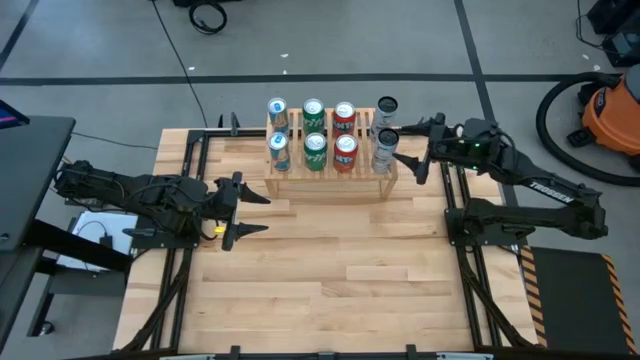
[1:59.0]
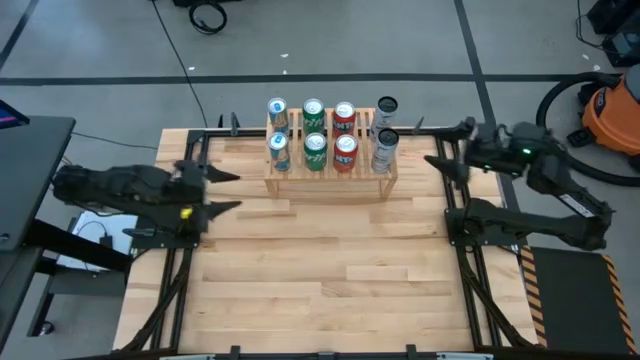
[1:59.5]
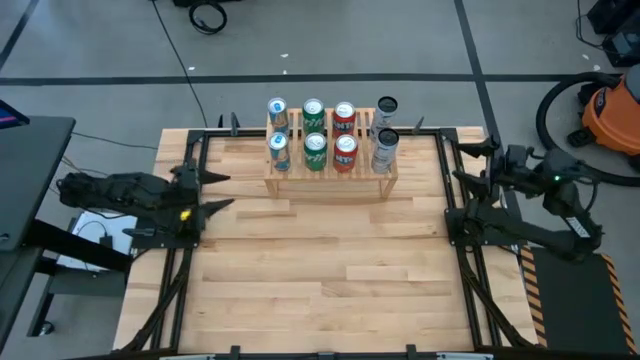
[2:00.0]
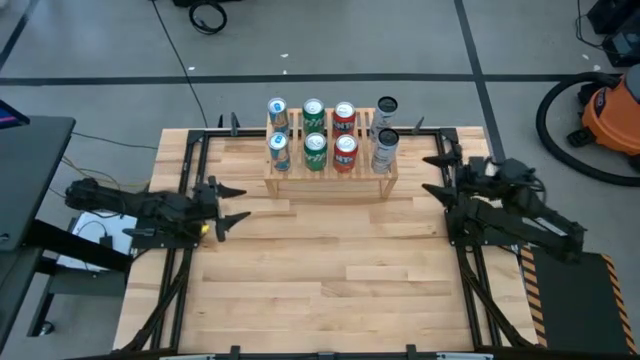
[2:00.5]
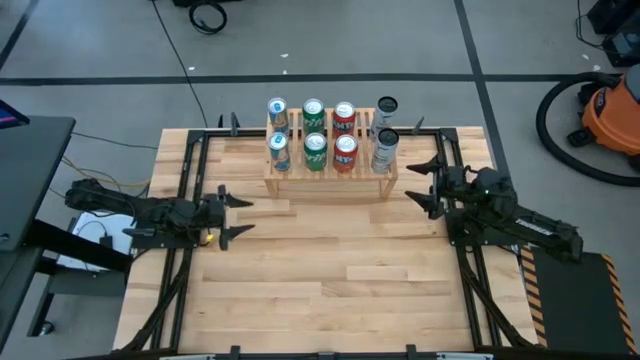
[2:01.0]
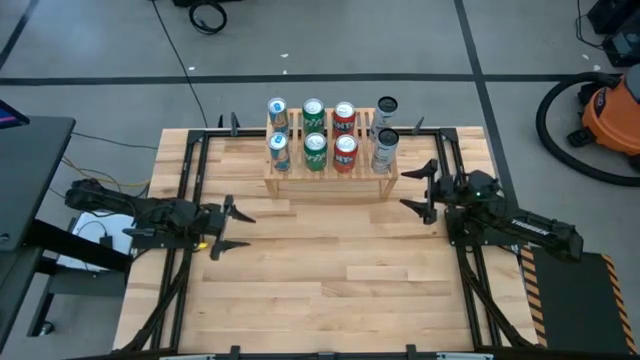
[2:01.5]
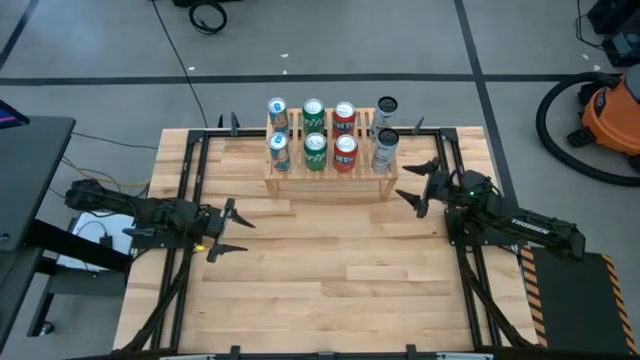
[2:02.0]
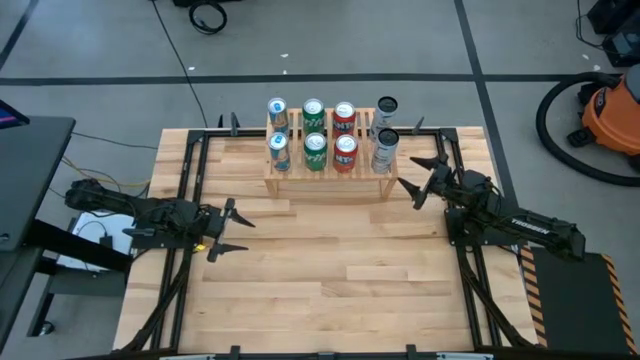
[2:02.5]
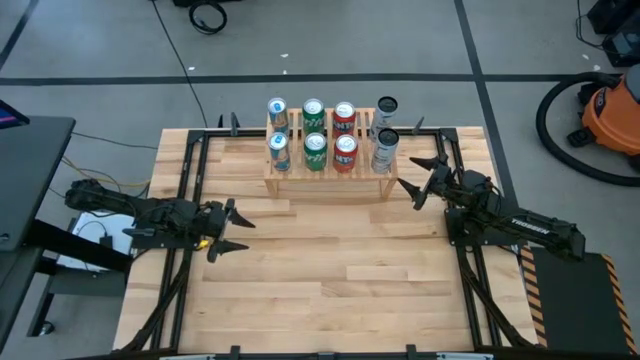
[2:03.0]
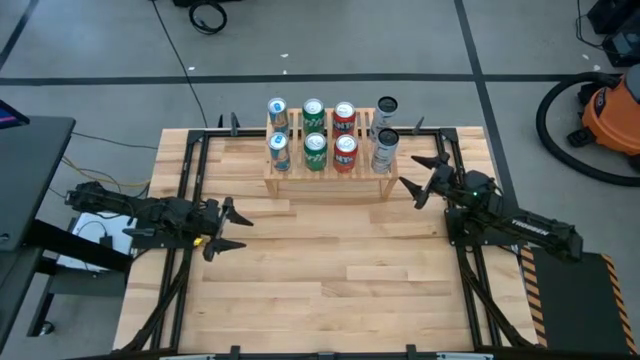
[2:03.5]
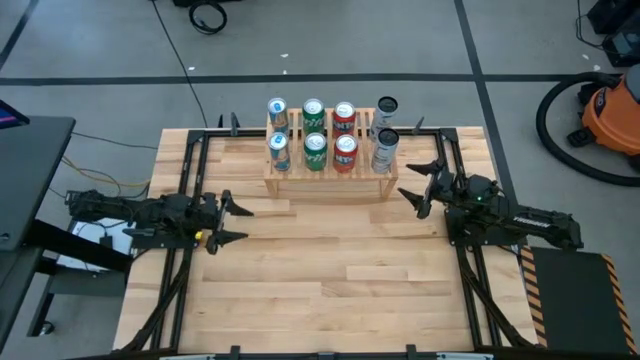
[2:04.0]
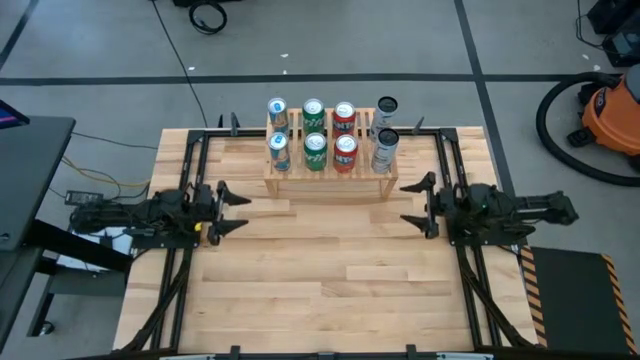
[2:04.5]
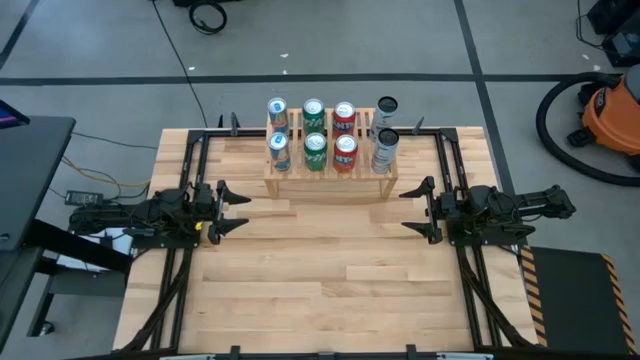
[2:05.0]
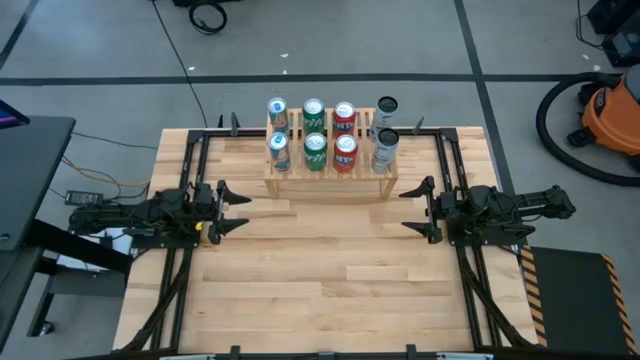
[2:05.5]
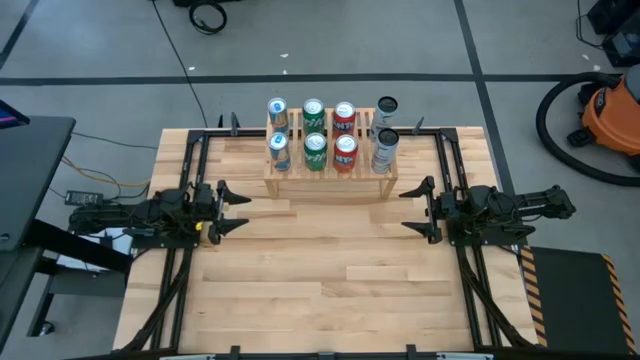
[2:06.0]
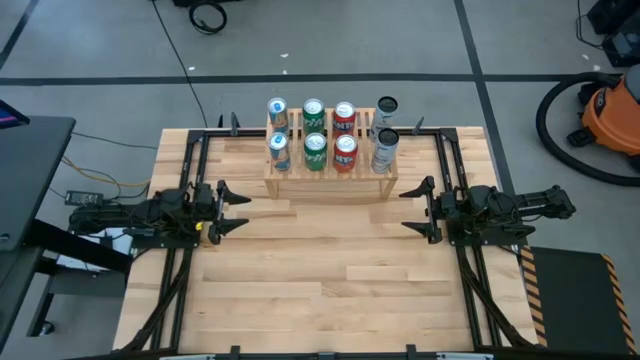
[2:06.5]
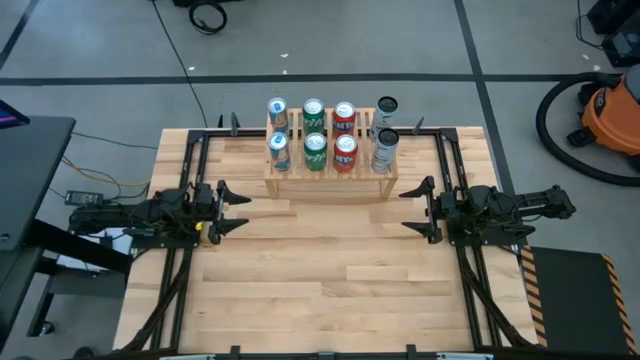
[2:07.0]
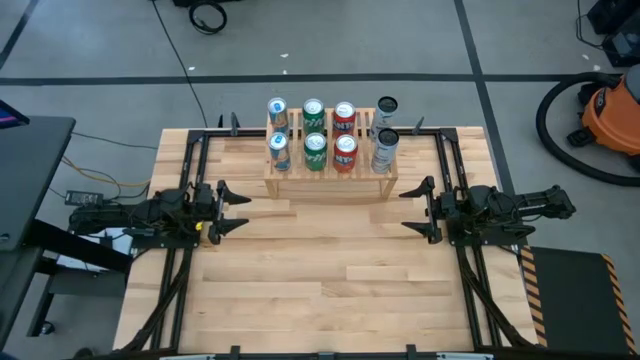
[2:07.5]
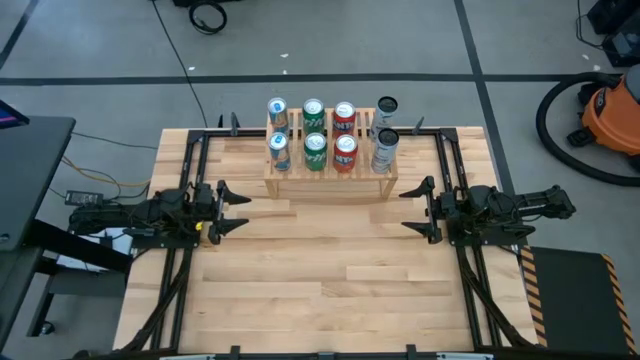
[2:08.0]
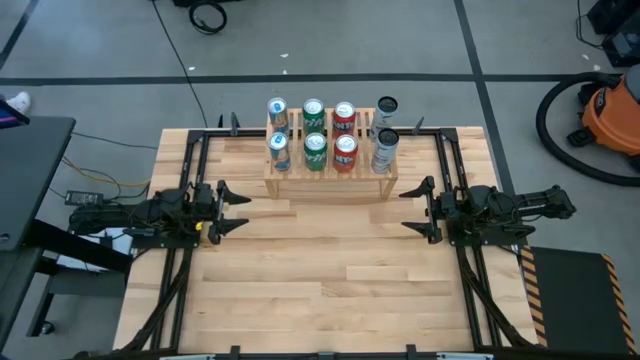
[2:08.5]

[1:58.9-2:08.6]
Task: Place canned beverage on shelf
Return to home Position

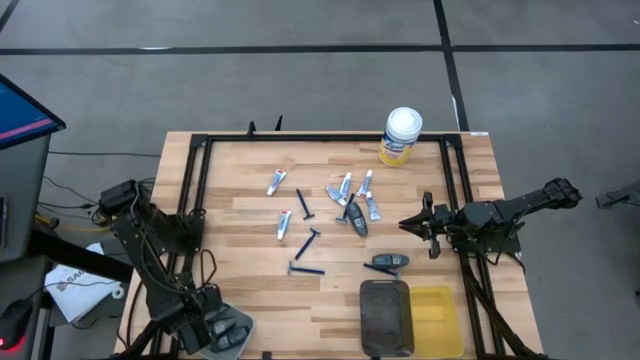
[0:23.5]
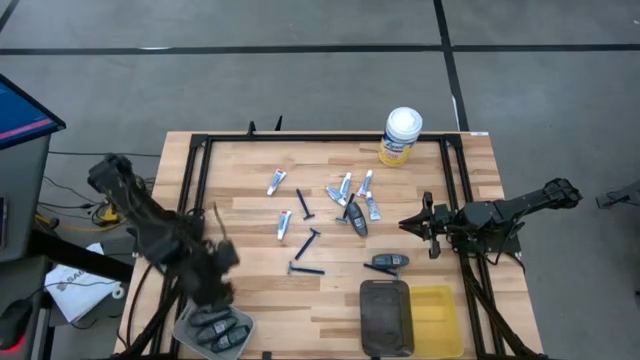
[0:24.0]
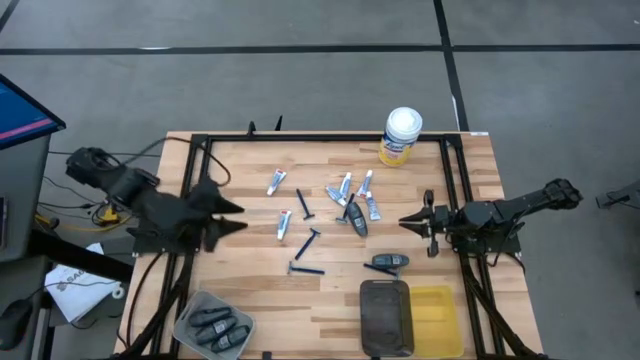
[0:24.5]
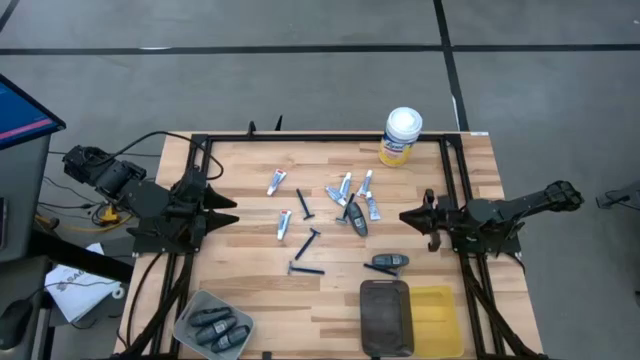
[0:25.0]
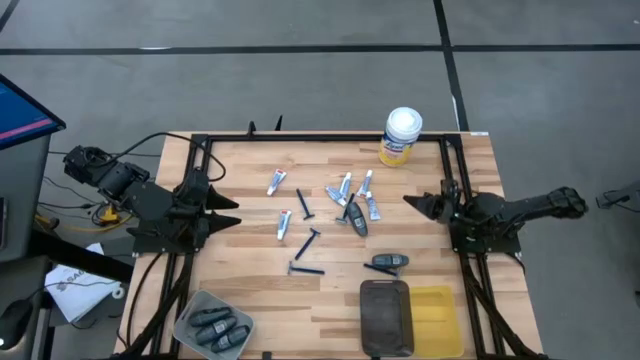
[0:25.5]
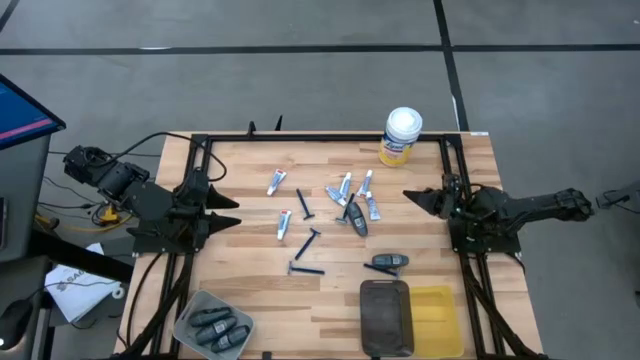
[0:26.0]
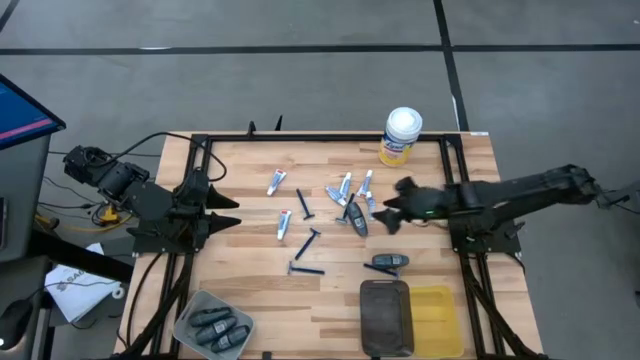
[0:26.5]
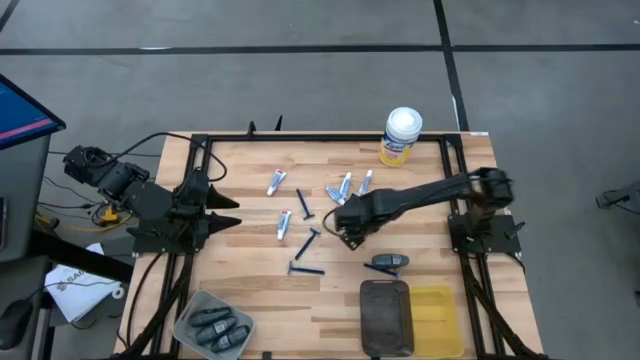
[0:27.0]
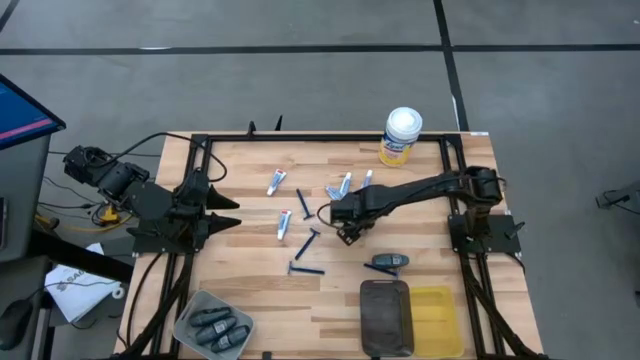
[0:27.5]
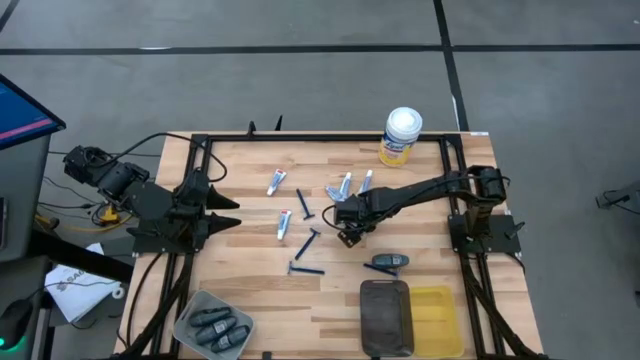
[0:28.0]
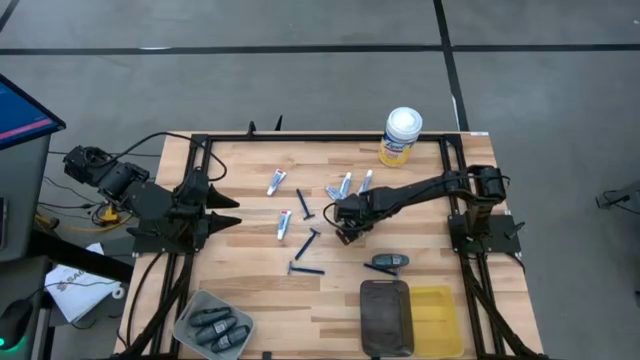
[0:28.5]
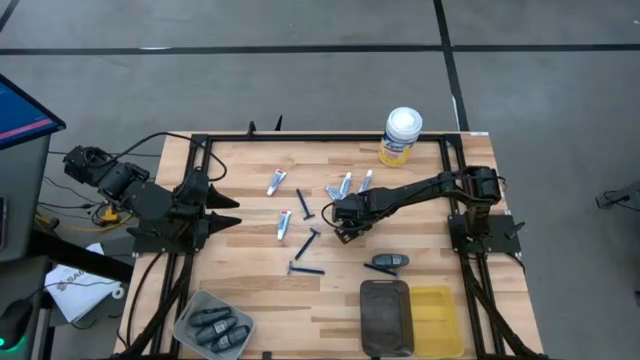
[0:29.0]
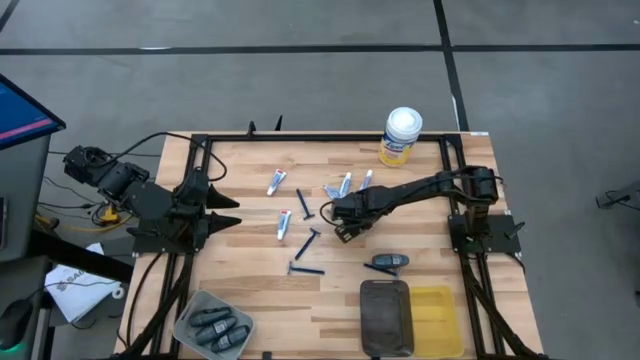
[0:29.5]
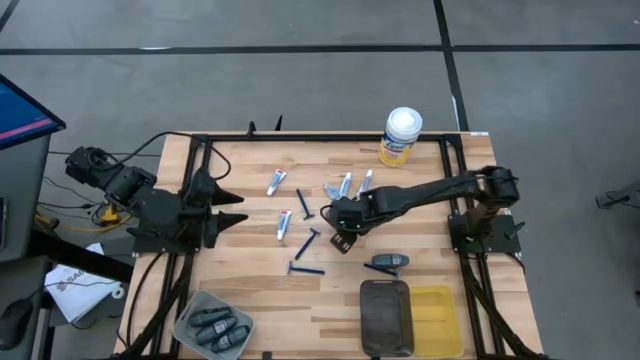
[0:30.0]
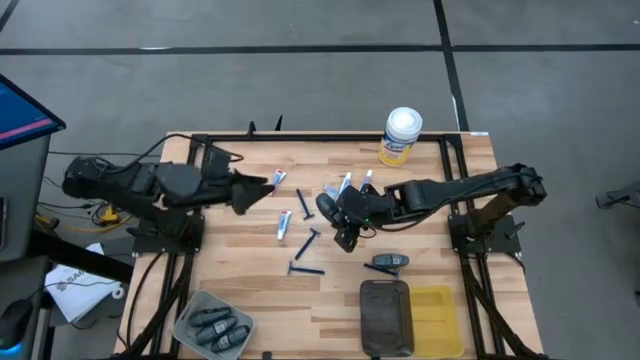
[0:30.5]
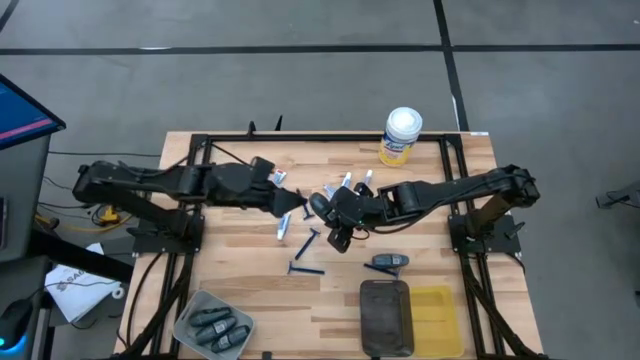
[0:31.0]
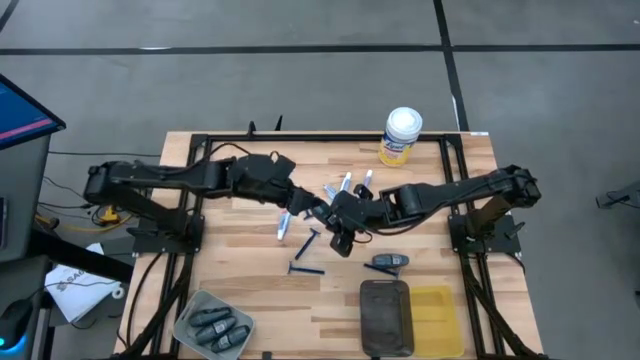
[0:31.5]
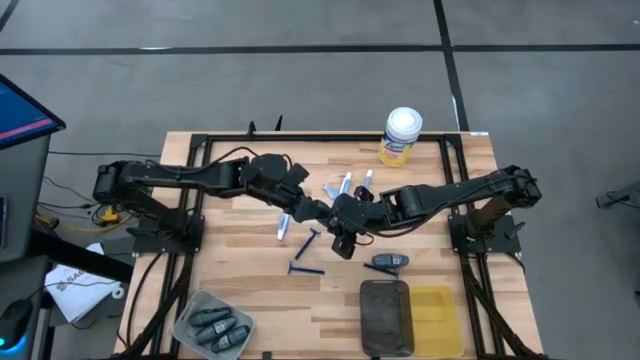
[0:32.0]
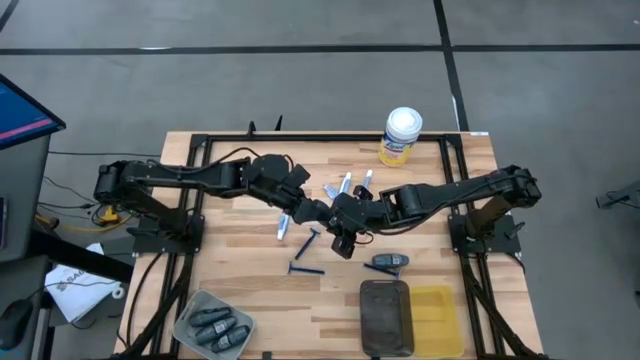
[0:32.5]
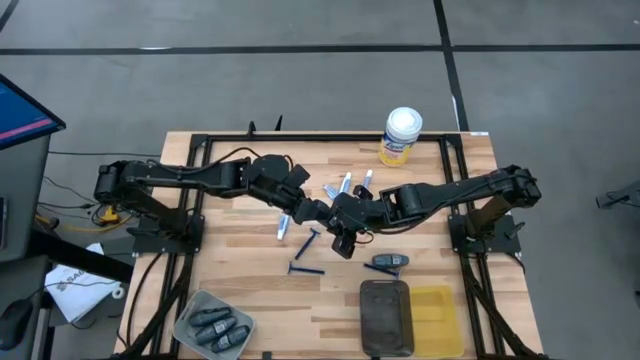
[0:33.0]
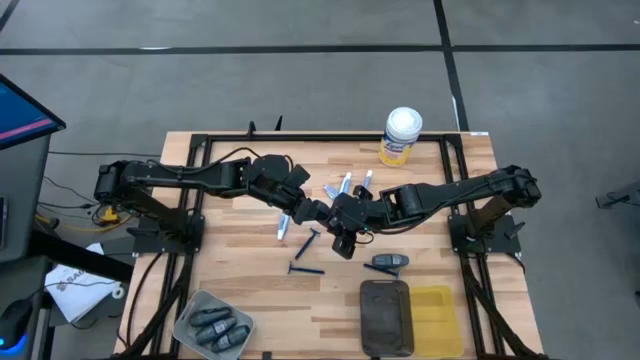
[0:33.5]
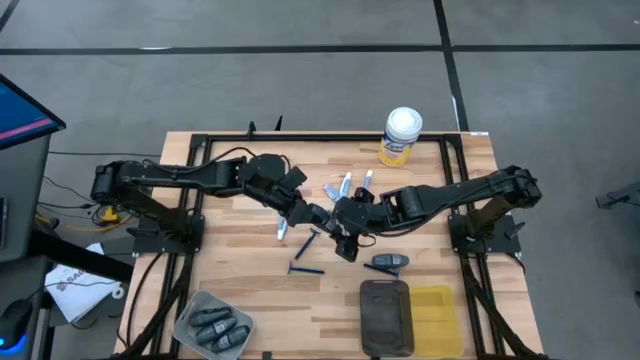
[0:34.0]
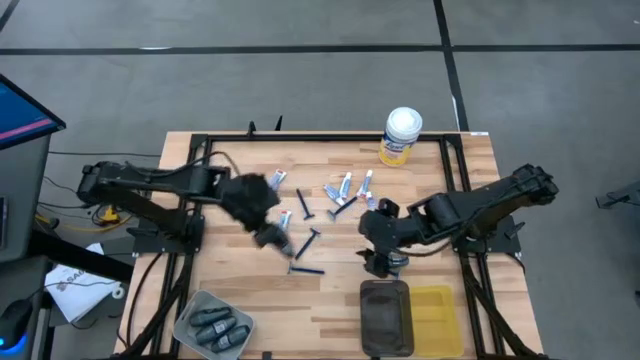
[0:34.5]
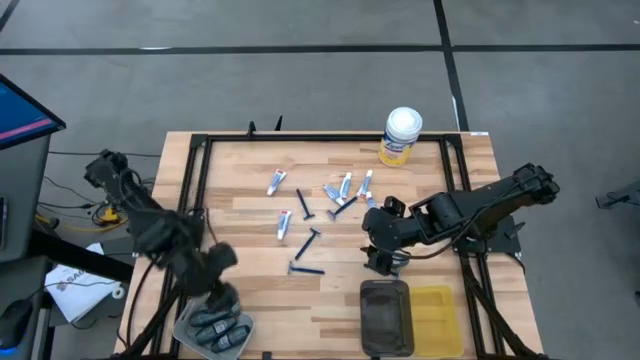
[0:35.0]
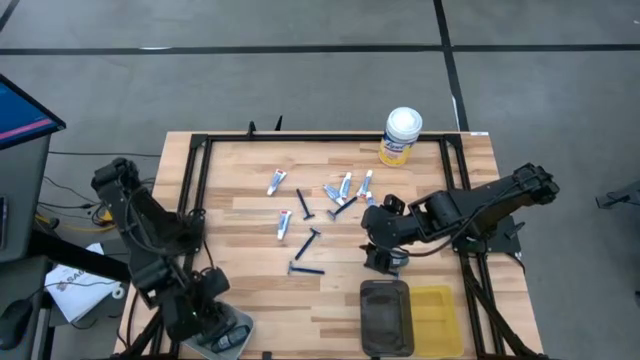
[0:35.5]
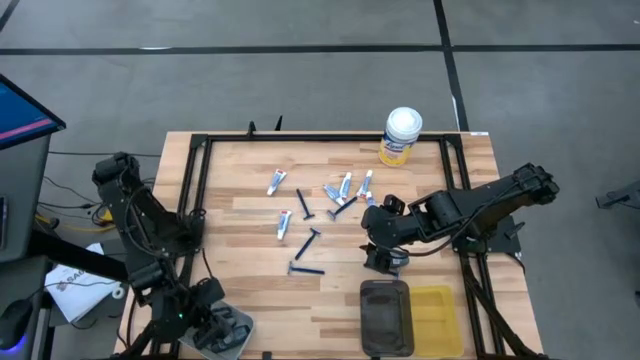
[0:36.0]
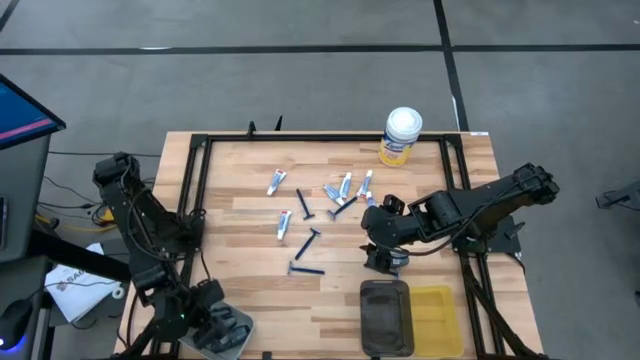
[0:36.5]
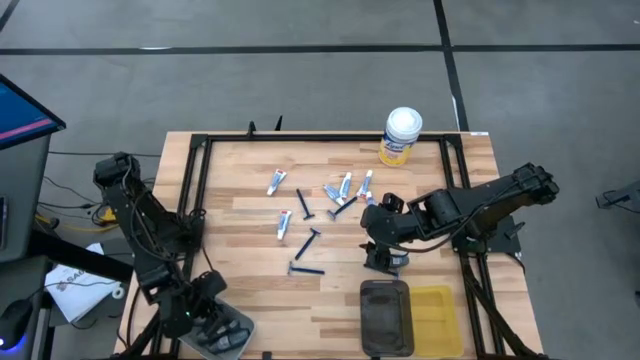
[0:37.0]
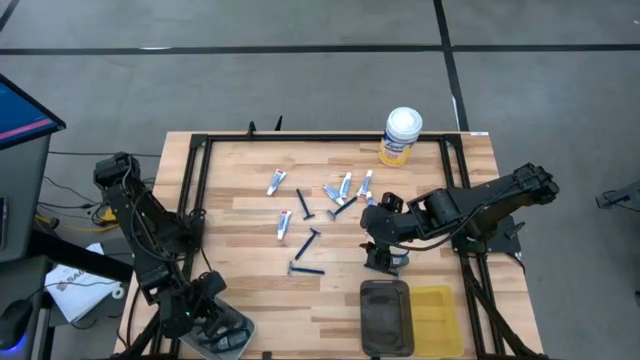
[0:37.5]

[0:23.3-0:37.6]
Task: Pick & Place Travel size toiletries
Put the deodorant into the gray bin
